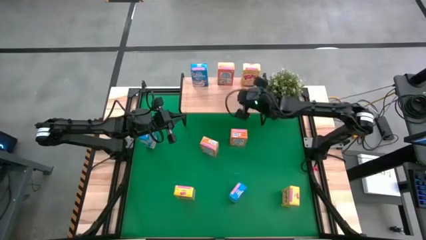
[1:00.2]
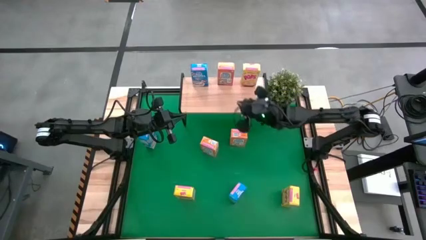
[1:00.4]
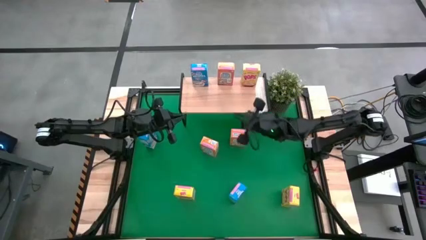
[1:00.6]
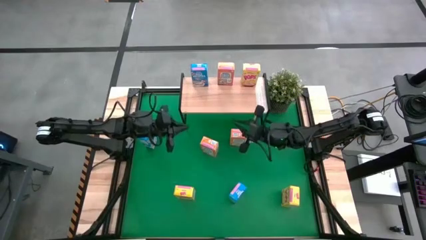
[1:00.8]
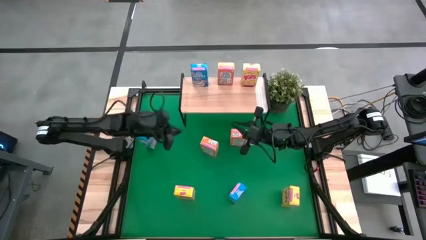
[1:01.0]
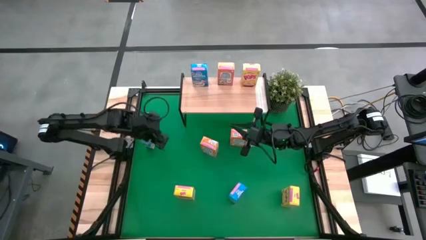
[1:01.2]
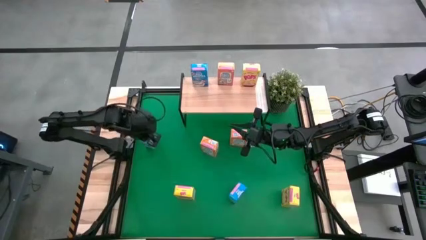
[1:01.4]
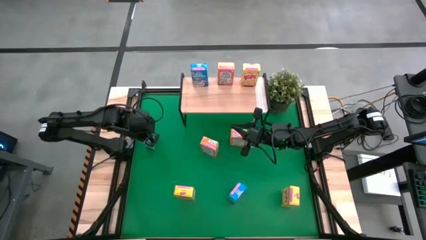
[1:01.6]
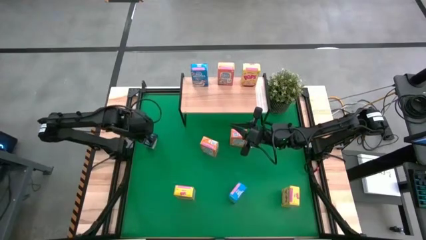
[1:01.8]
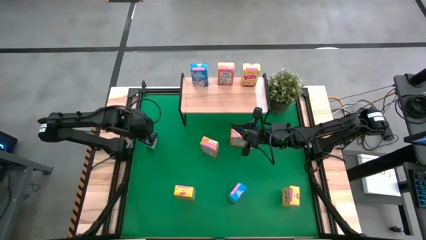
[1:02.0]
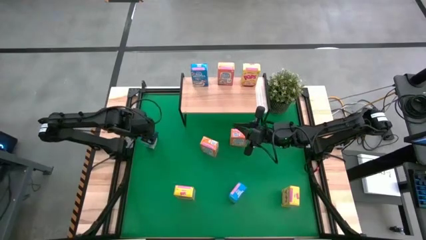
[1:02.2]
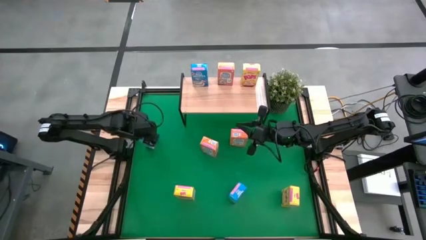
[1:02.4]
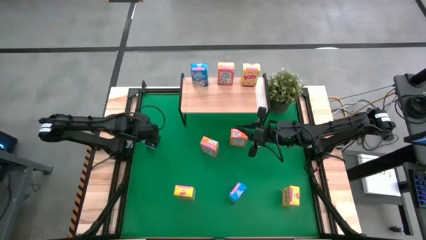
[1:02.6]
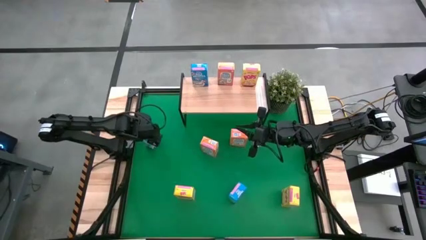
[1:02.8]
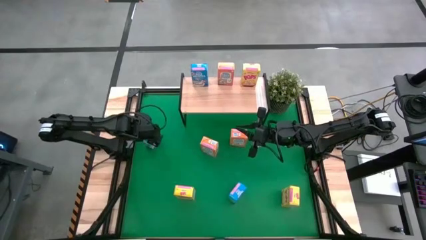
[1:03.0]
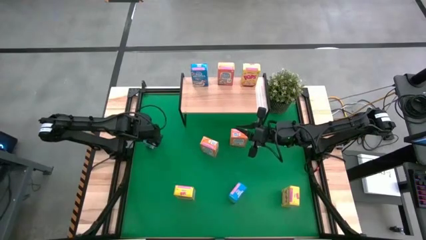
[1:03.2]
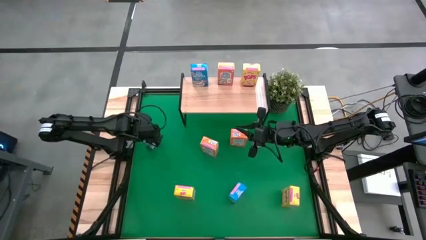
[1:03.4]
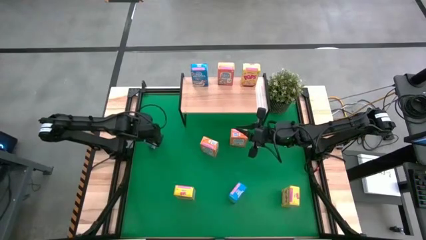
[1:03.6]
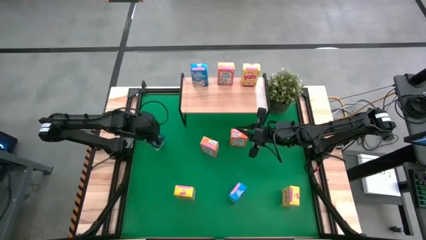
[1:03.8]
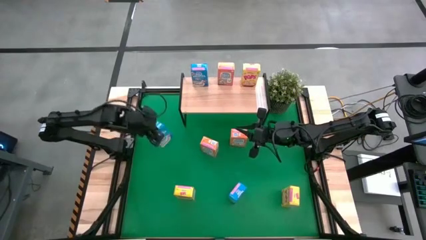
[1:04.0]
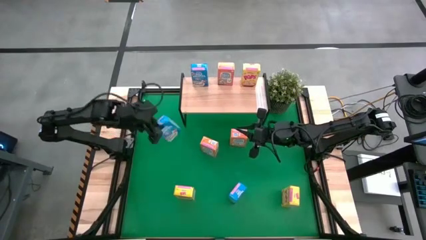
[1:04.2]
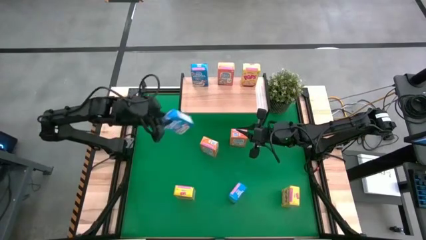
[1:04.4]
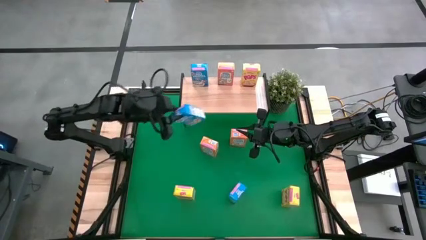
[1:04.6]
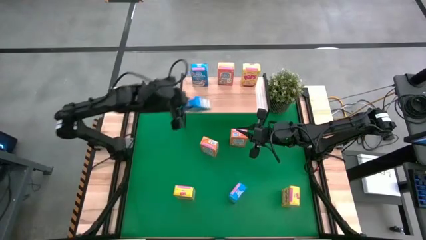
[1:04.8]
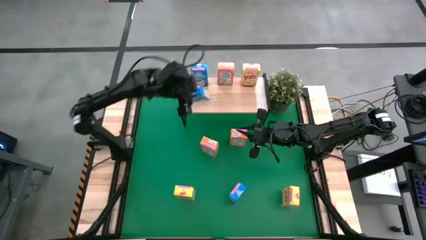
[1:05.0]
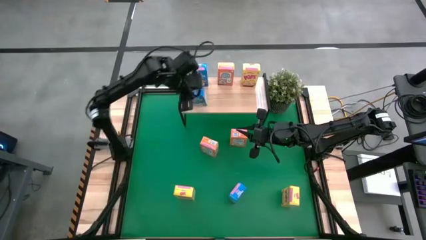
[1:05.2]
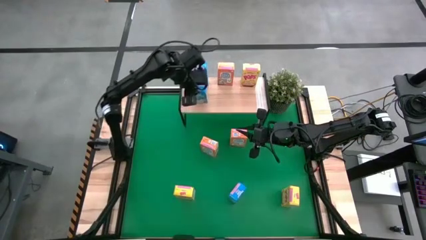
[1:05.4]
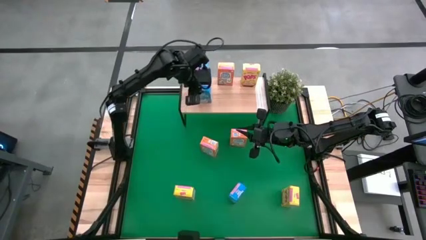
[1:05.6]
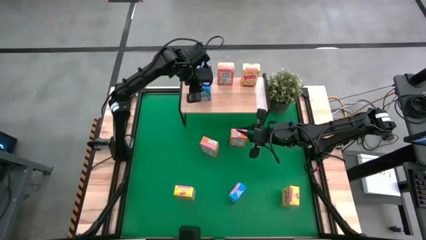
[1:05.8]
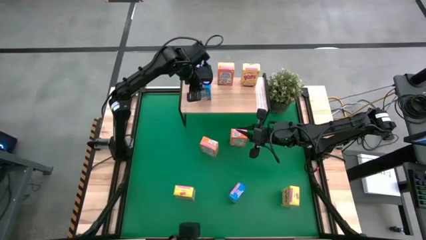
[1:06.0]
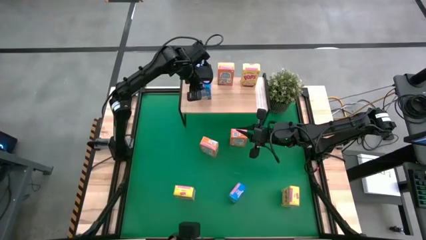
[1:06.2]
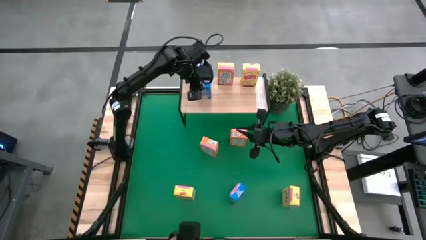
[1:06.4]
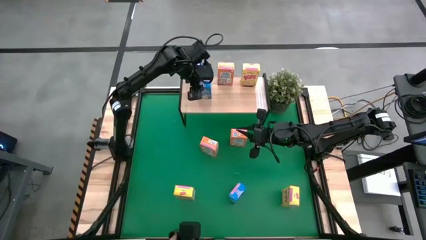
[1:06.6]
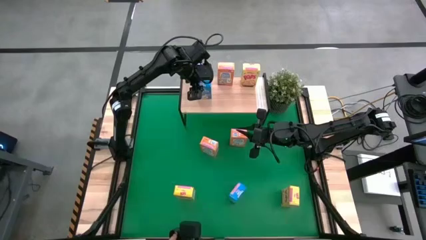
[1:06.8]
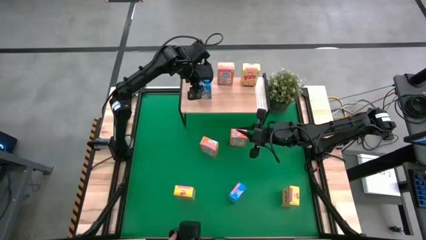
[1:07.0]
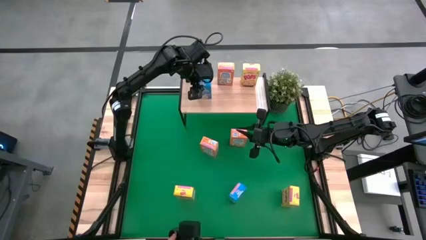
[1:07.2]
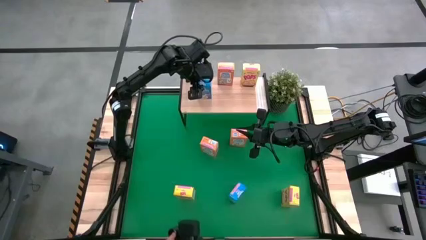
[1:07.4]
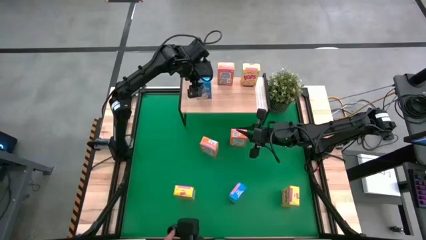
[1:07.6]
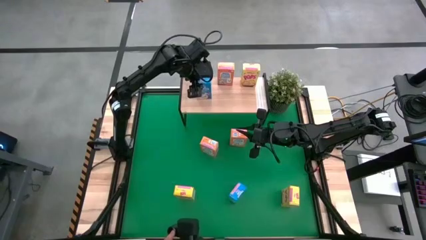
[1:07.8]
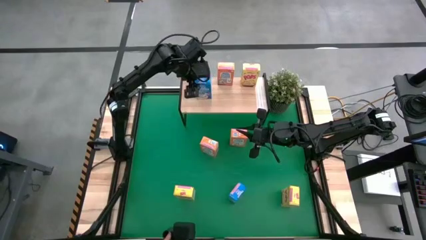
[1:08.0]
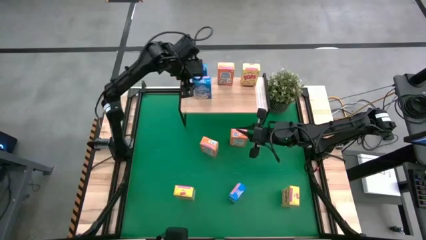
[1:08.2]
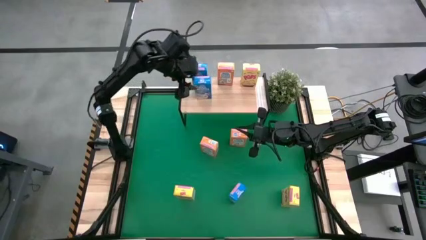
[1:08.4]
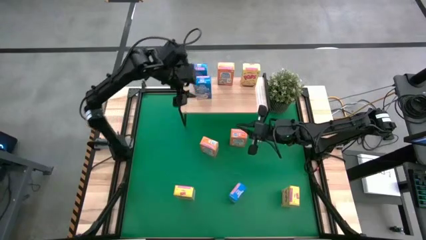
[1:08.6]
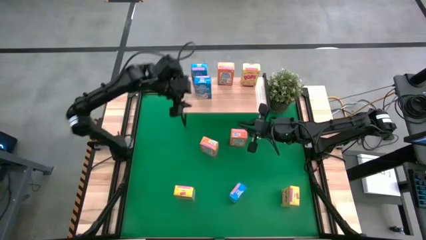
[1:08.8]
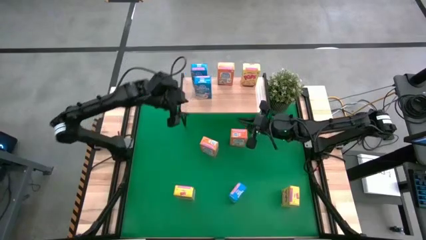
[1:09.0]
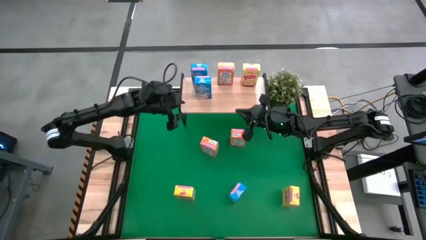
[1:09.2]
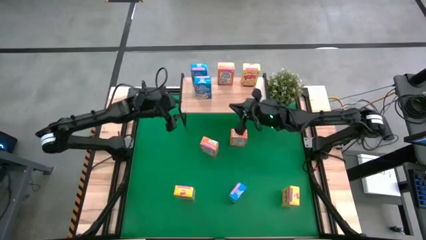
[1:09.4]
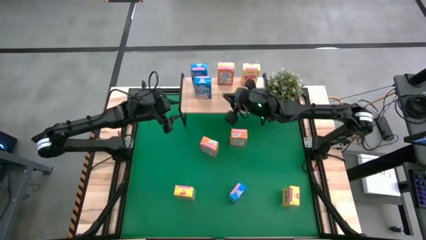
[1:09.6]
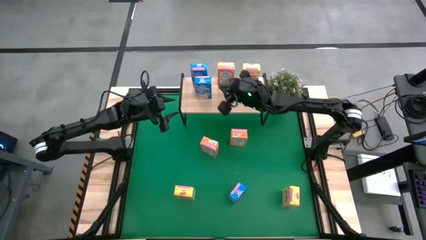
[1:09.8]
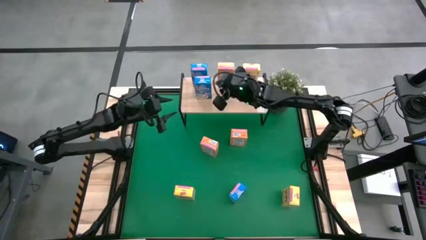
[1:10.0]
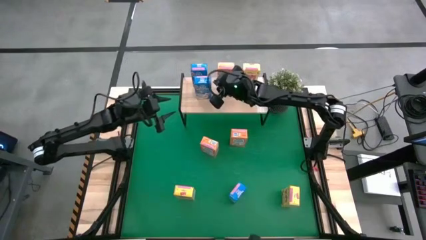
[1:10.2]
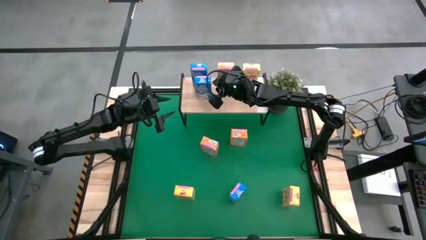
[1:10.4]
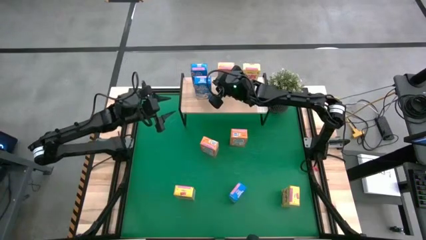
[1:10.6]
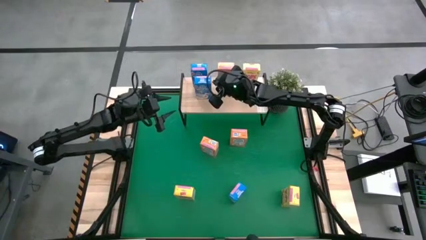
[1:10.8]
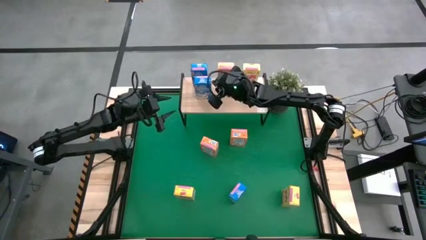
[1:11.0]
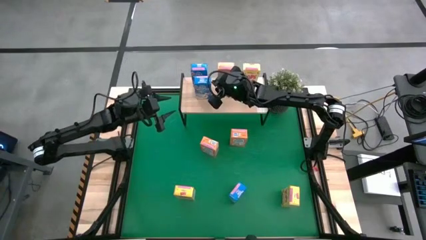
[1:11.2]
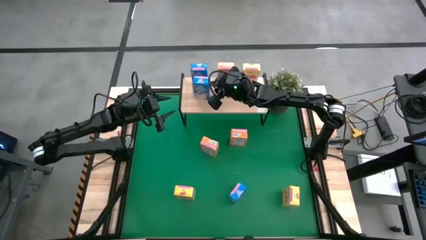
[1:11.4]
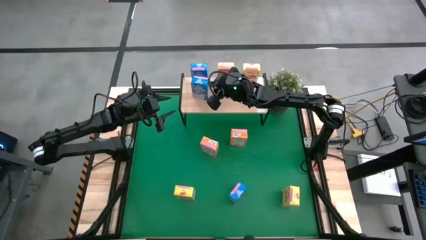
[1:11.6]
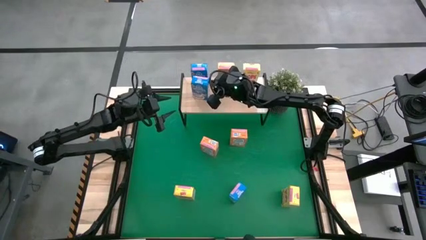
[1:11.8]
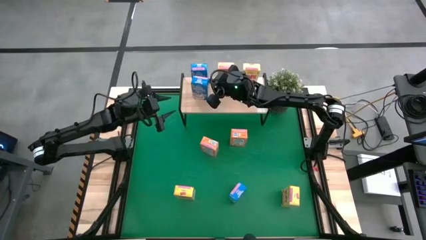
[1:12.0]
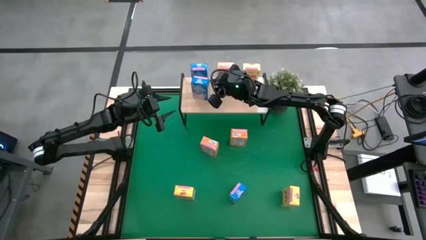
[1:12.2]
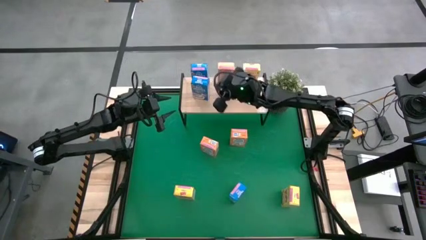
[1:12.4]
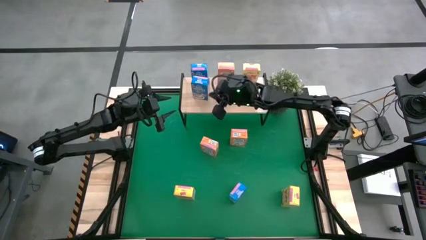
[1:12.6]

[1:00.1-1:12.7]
Task: Stack cereal on shelf
Put the top blue cereal box on the shelf

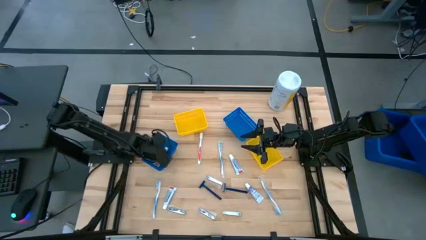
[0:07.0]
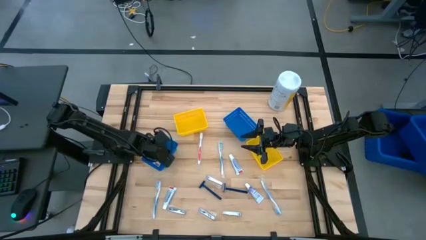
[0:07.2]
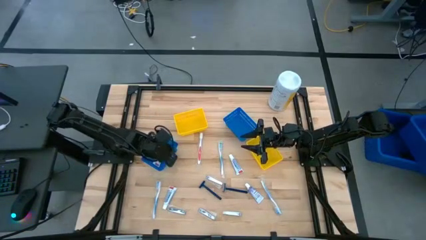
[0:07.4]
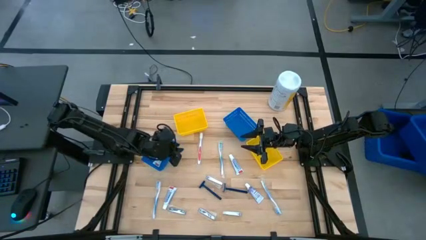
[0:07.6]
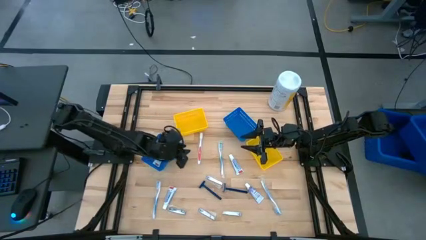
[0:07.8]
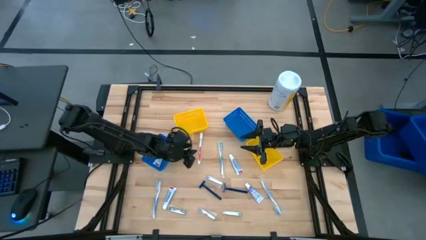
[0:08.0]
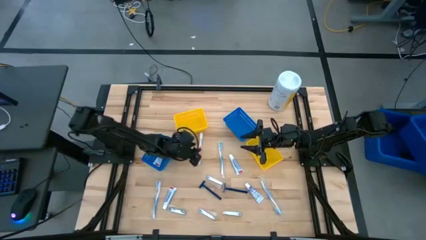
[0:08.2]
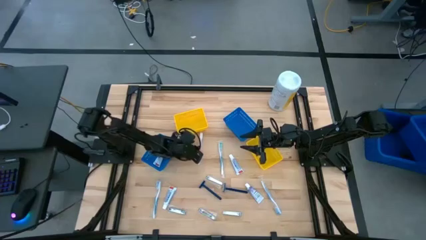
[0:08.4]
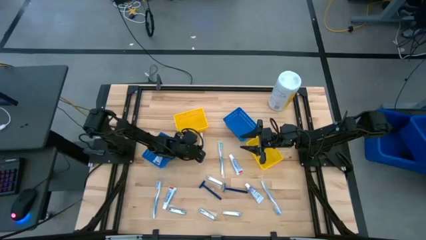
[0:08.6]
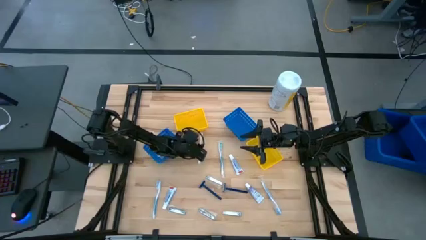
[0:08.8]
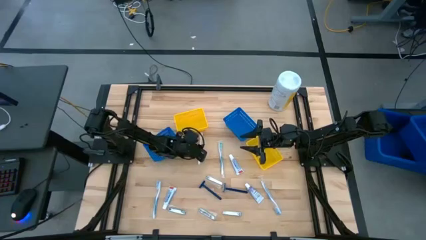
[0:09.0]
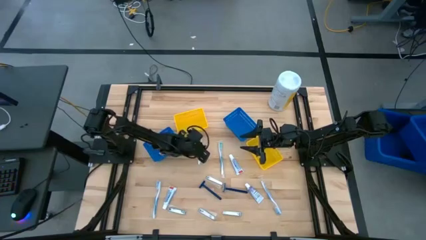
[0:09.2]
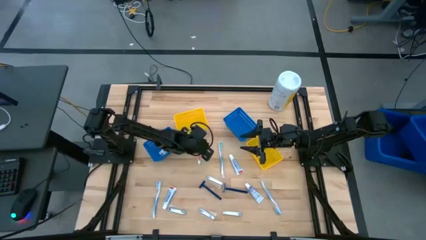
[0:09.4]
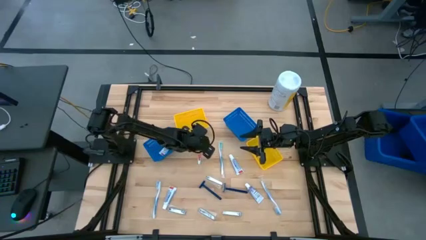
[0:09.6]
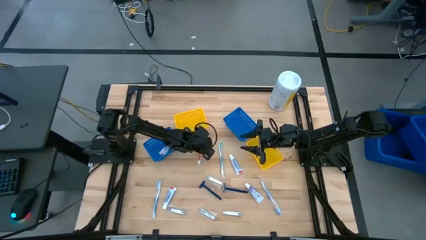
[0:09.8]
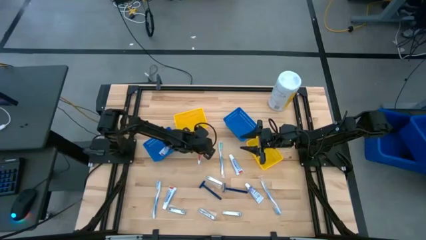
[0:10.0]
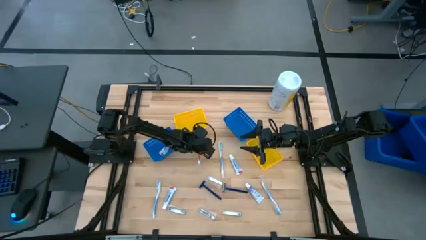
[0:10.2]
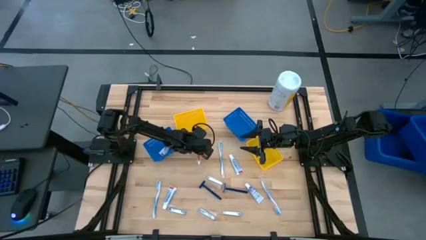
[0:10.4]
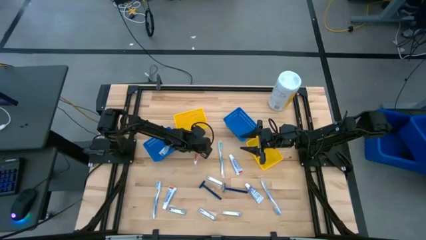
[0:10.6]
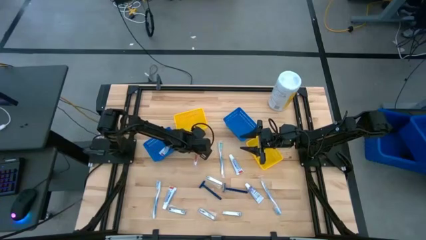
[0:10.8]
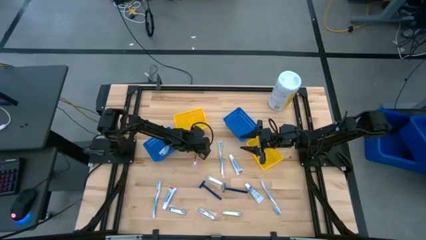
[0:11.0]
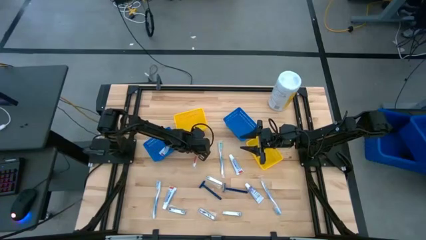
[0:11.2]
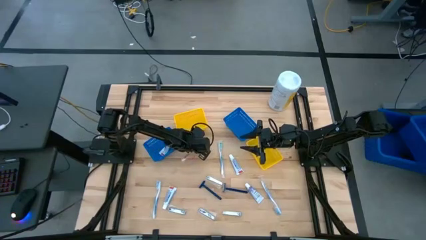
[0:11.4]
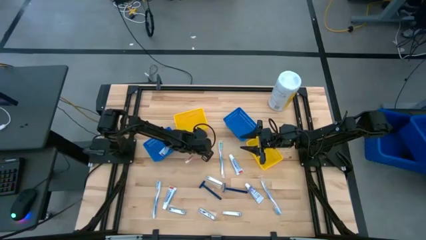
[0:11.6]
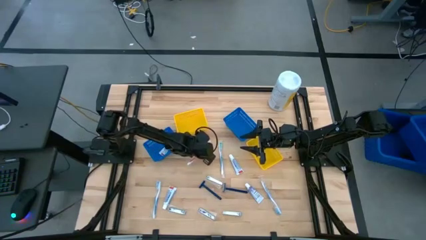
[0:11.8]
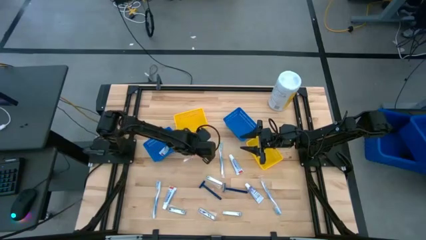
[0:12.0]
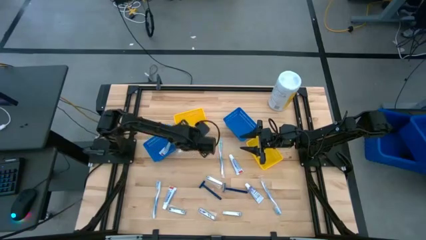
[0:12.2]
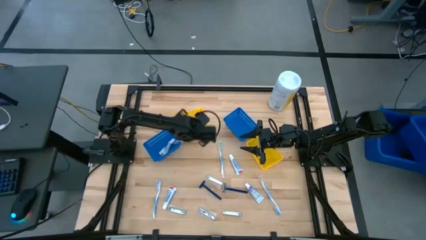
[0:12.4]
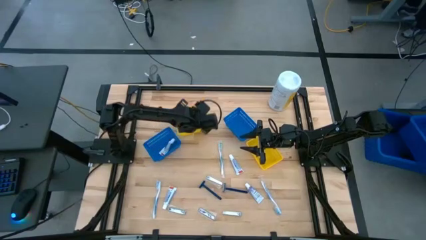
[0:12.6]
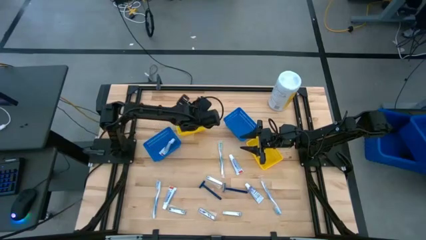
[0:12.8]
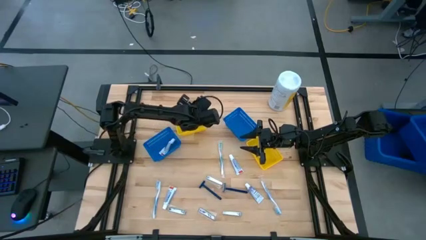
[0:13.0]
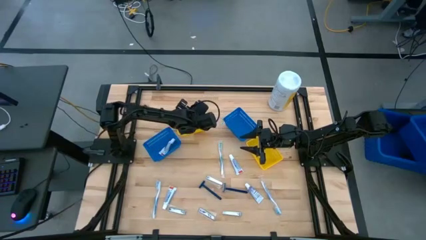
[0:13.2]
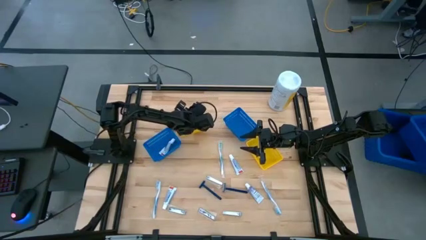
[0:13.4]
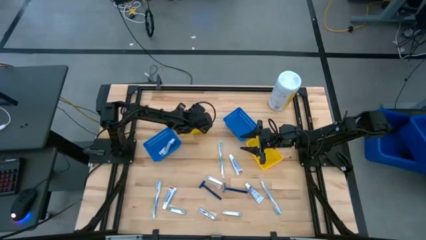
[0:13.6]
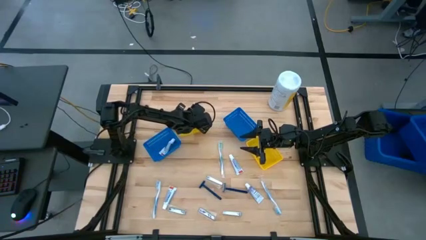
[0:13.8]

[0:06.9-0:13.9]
Task: Pick & Place Travel size toiletries
Put the orange toothbrush into the left yellow bin
